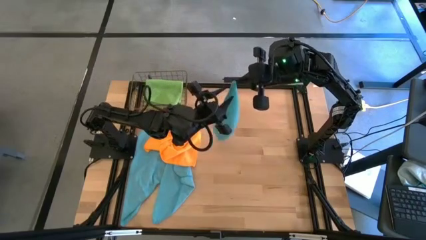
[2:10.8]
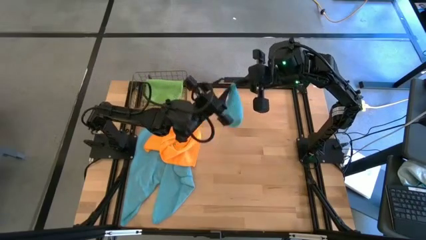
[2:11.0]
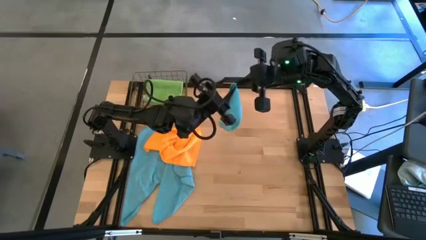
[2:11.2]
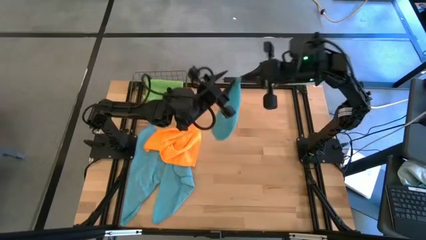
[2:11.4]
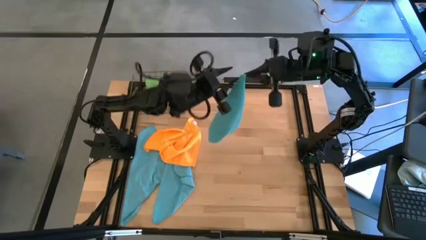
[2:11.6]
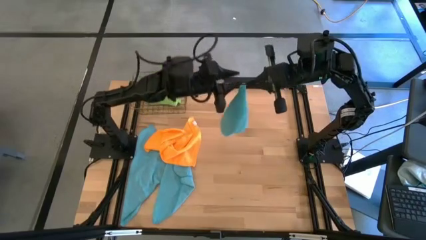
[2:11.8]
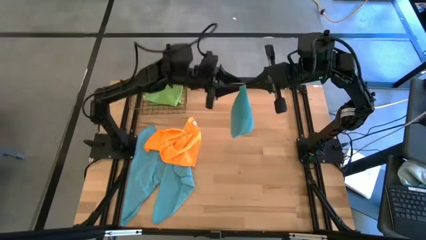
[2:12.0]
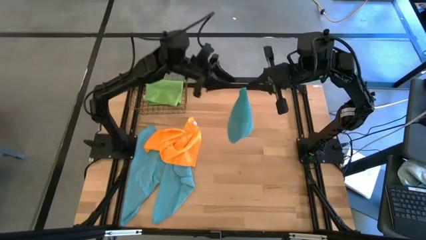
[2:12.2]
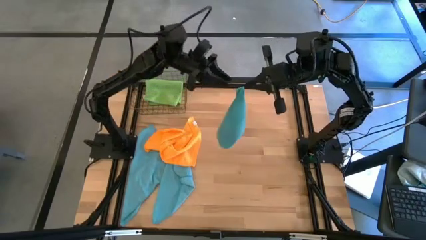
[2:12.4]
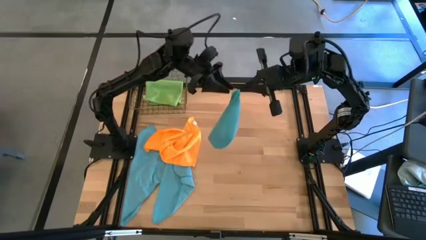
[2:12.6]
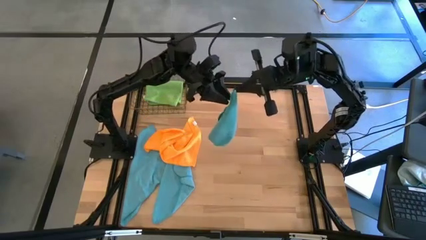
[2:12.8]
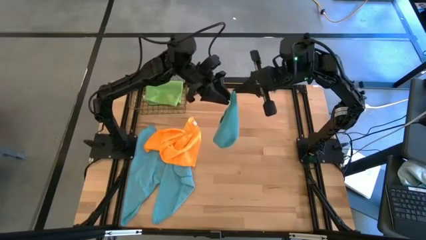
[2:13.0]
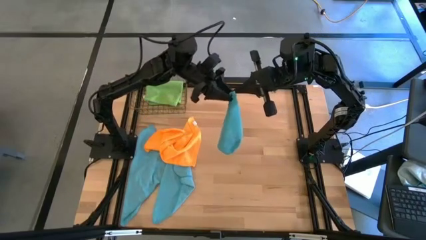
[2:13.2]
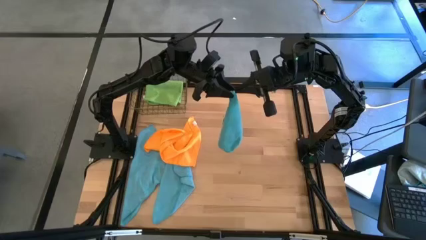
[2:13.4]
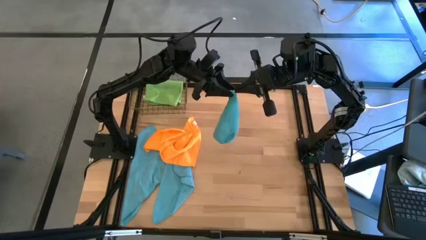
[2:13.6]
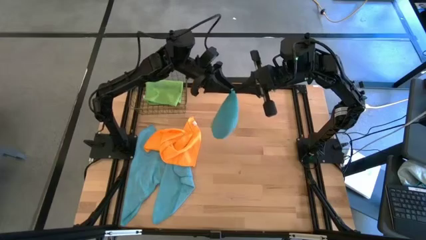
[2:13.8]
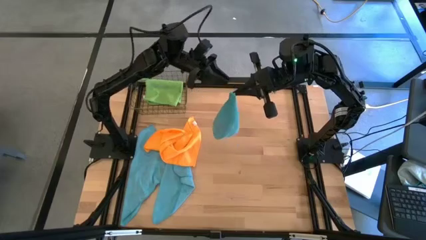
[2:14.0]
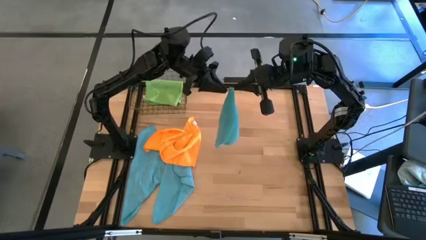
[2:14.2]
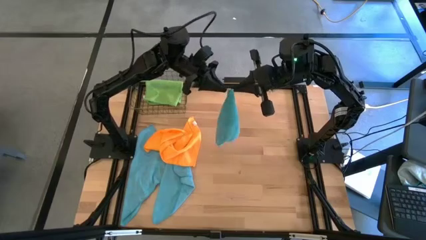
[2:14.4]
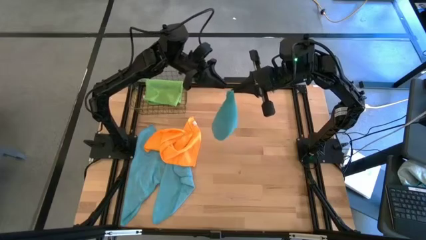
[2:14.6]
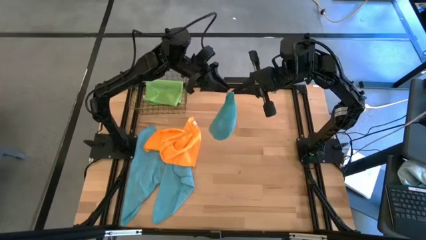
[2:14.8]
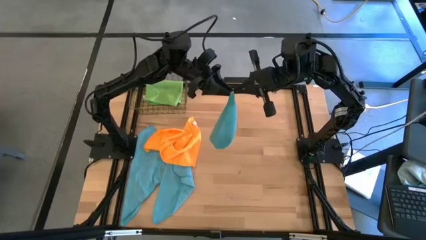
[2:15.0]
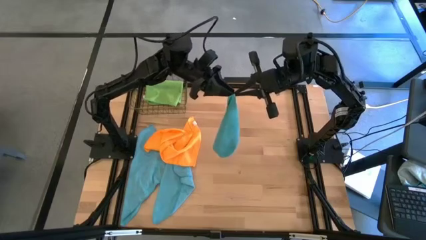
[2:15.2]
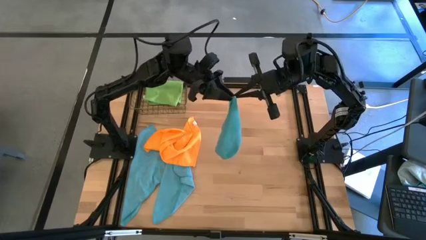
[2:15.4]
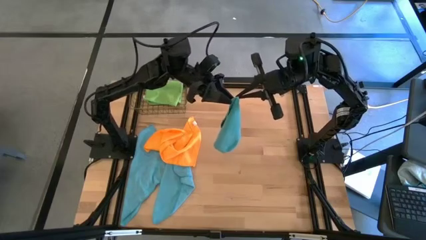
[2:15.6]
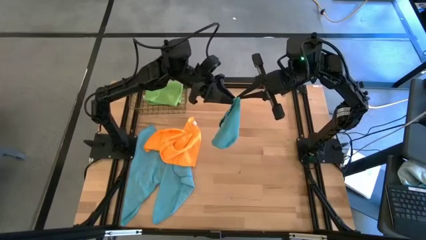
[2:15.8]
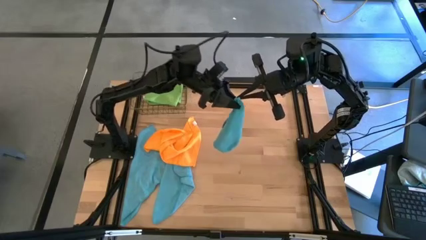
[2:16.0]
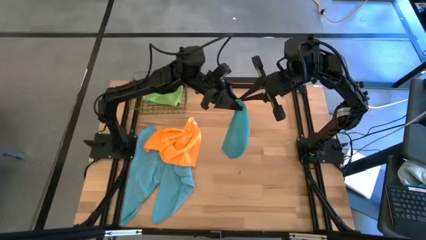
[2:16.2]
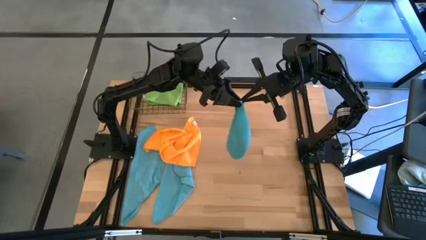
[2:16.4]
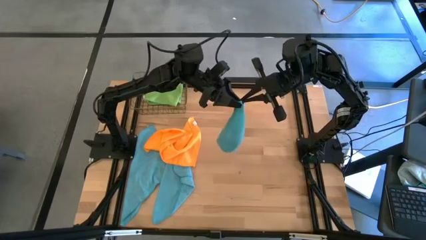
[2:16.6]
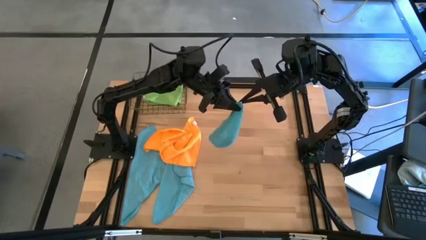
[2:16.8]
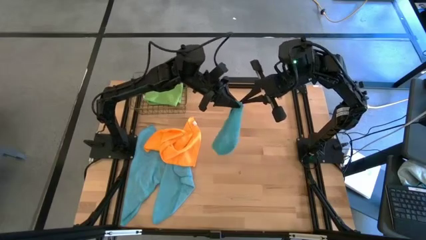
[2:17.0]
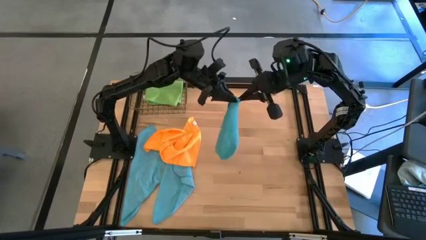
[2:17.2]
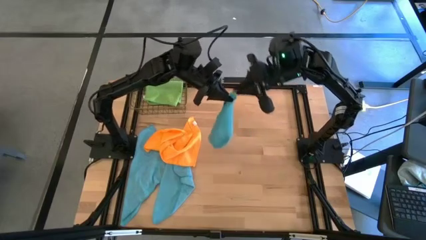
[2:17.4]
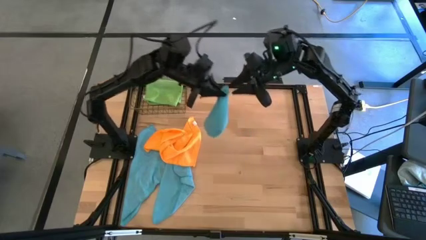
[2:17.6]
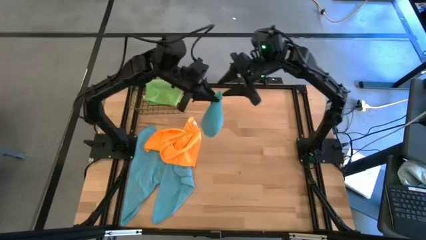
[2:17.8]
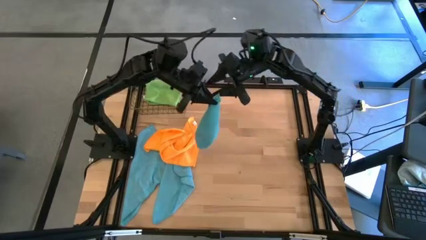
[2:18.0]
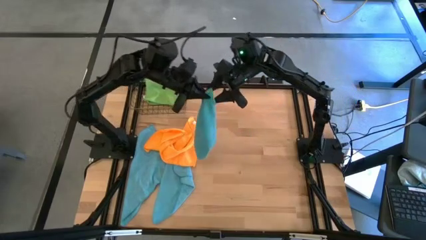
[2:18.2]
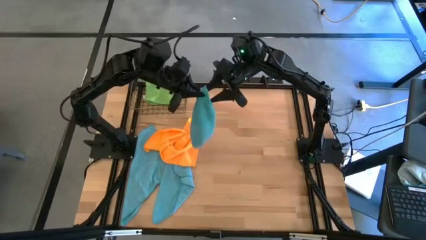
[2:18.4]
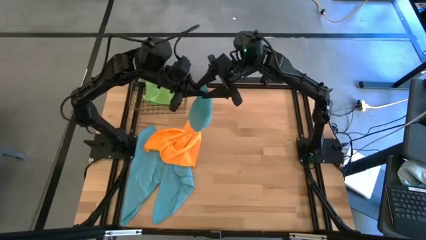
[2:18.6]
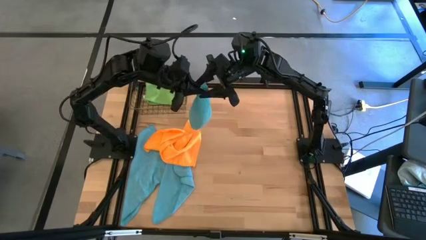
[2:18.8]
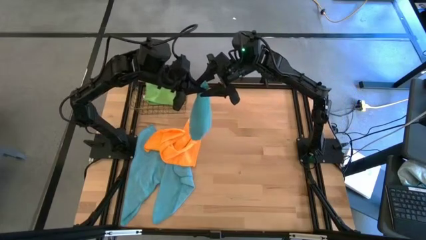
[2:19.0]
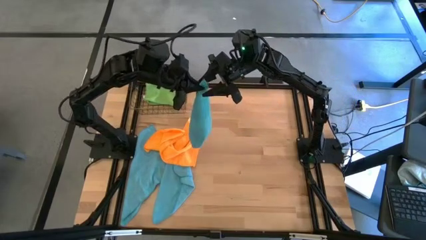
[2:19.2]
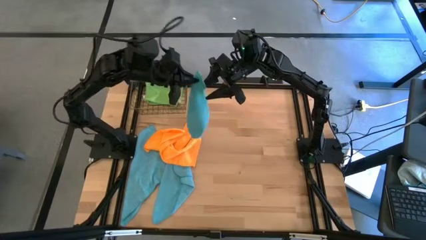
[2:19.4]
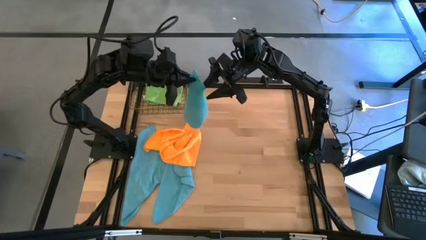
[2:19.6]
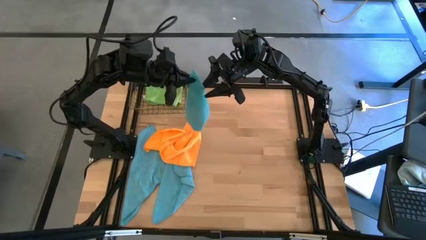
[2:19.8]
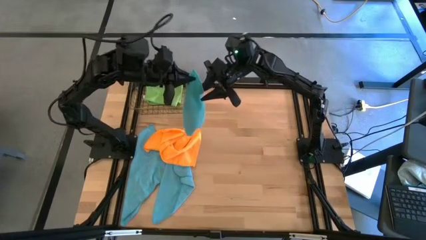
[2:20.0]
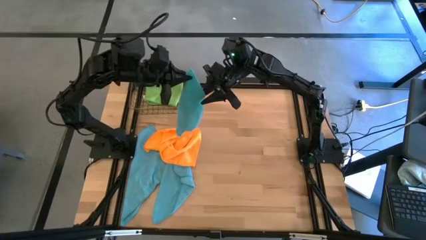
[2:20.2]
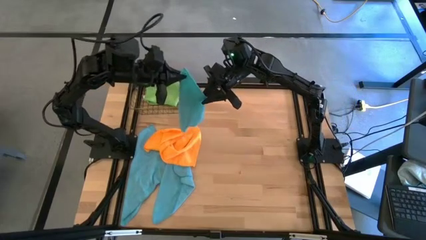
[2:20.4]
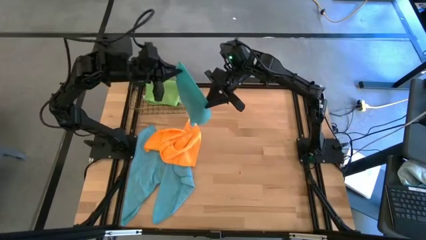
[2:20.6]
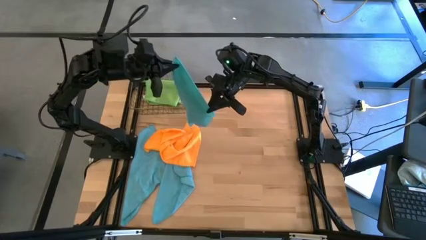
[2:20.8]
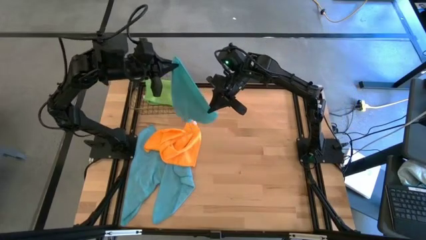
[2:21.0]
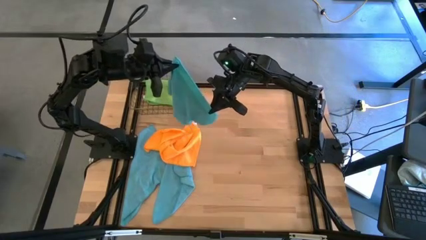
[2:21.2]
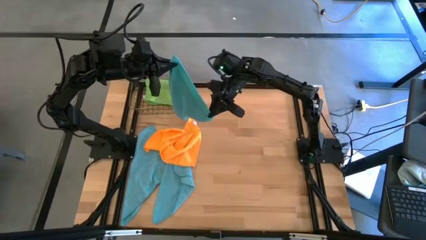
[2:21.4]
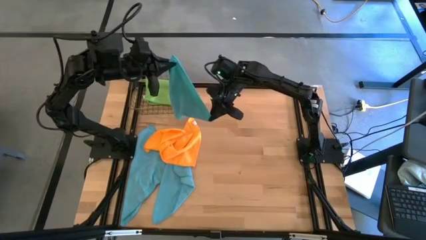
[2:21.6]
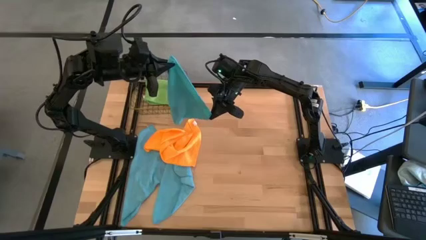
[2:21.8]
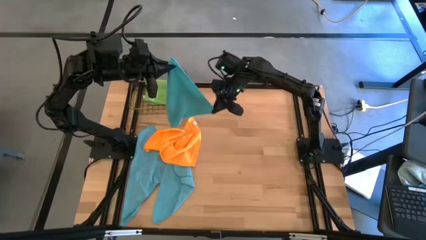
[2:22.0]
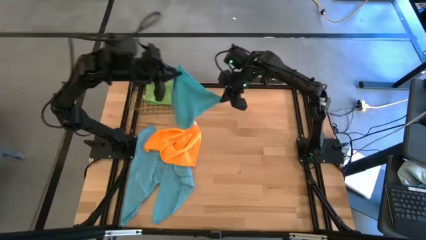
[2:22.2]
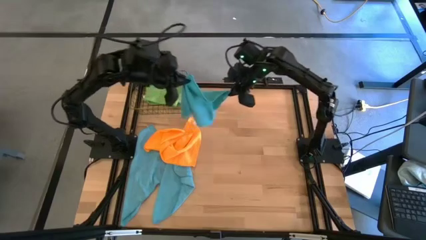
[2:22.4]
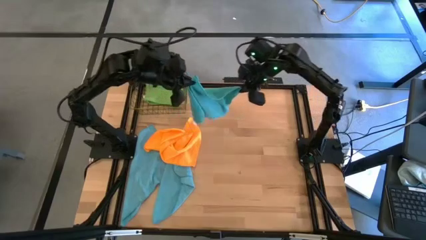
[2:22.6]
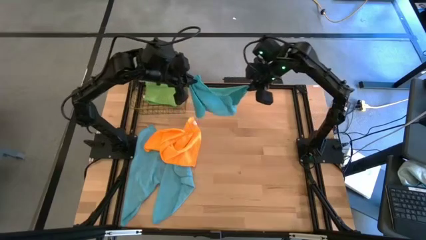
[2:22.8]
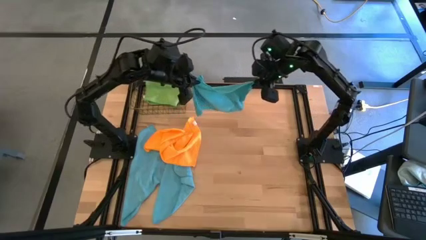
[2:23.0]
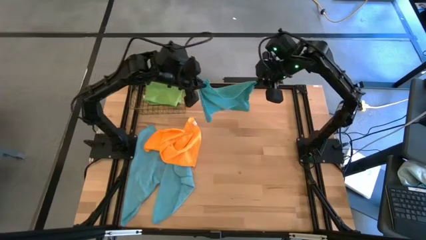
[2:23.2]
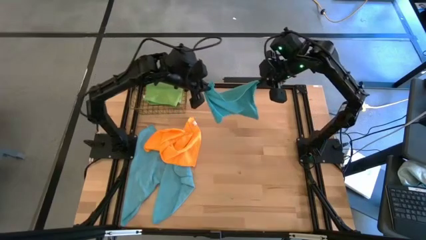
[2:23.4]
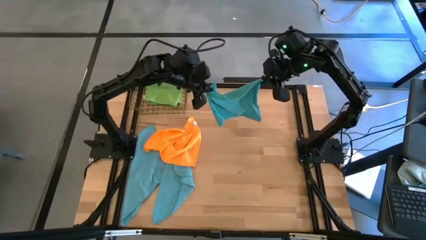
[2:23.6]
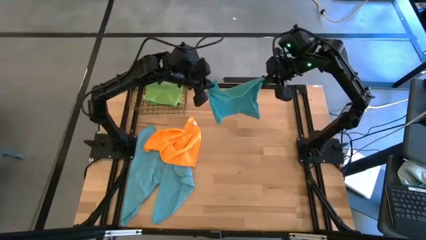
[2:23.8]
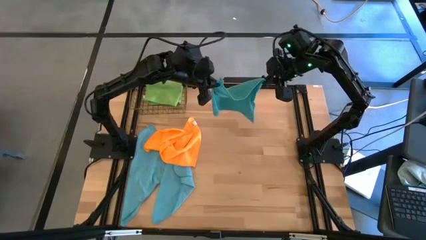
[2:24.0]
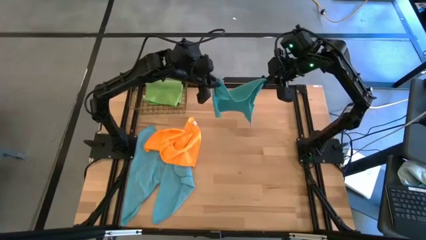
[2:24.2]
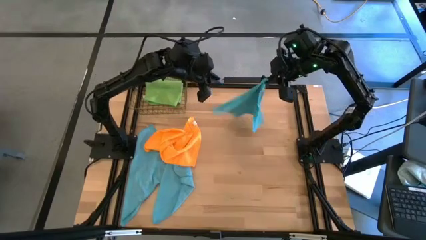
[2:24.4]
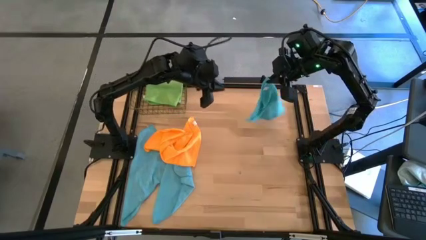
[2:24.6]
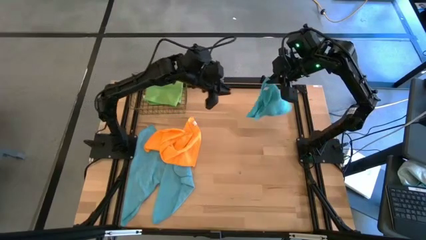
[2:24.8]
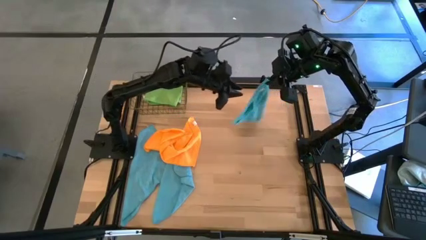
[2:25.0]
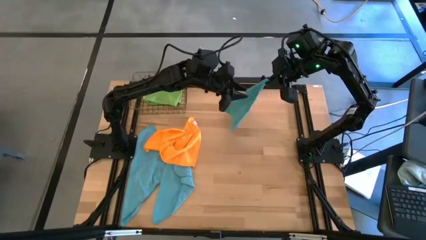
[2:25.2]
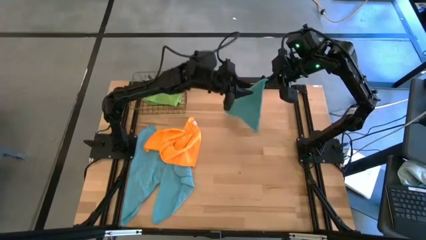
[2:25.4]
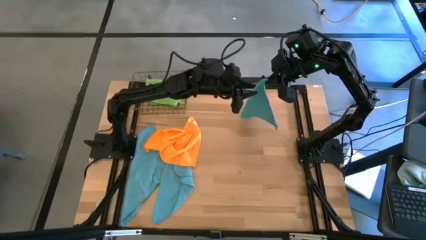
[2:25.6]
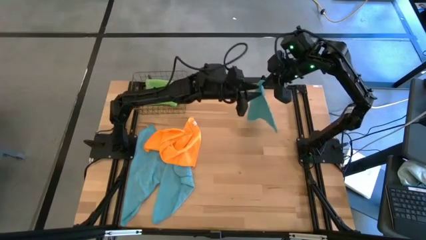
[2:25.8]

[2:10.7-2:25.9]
Task: Fold microfiber towels
Fold the blue microfiber cloth

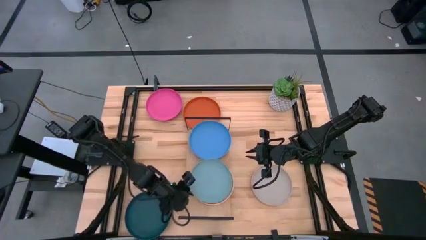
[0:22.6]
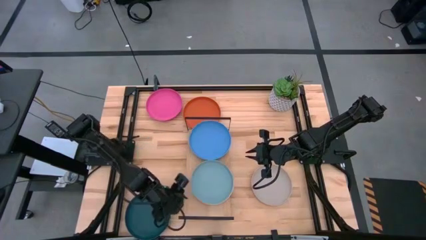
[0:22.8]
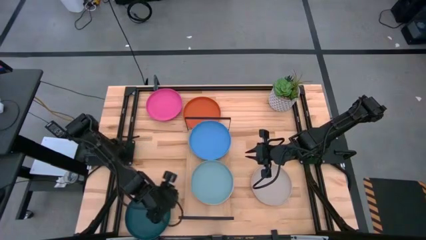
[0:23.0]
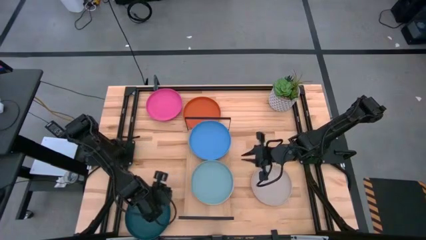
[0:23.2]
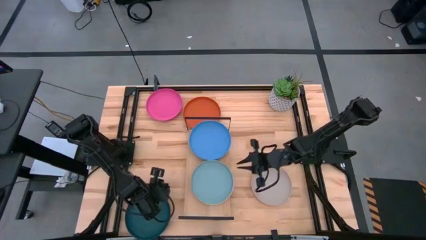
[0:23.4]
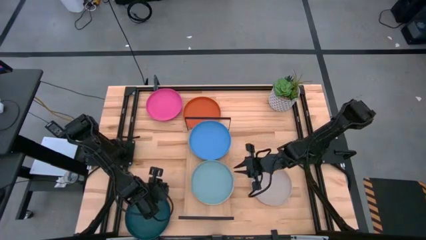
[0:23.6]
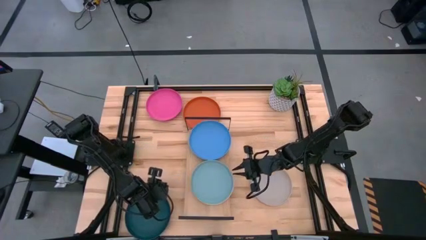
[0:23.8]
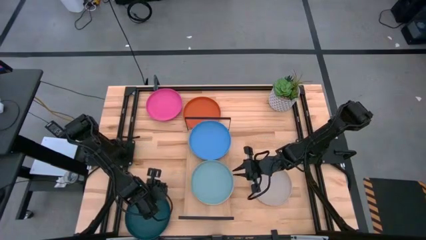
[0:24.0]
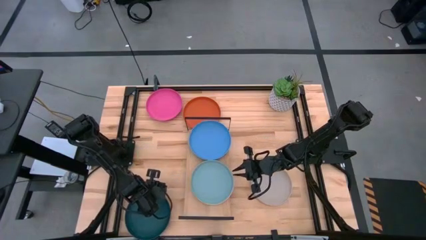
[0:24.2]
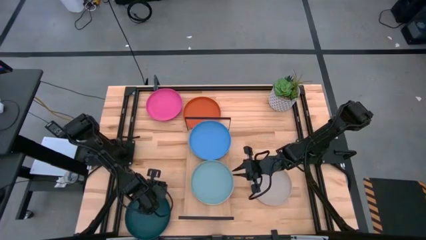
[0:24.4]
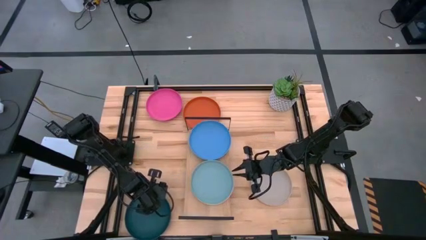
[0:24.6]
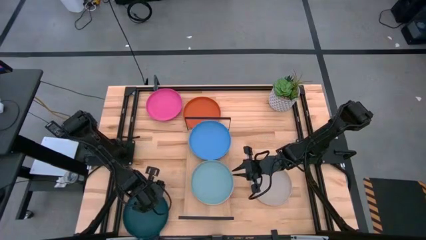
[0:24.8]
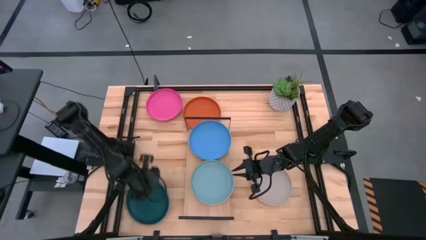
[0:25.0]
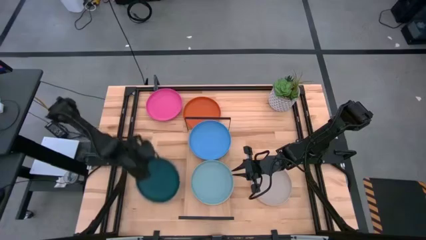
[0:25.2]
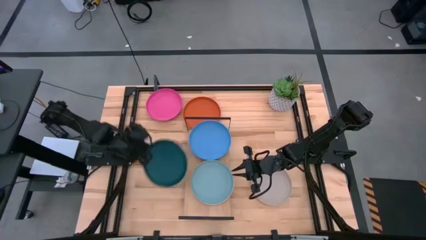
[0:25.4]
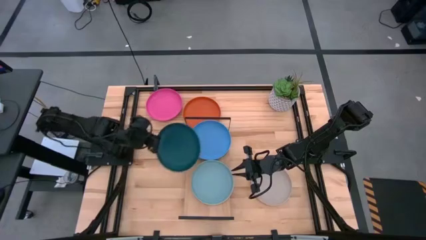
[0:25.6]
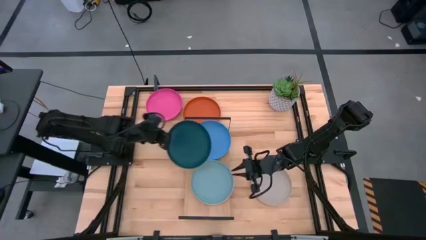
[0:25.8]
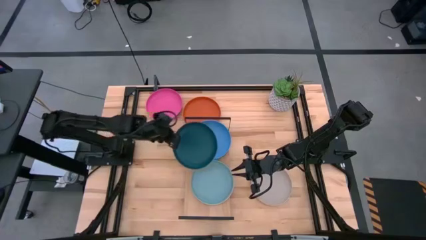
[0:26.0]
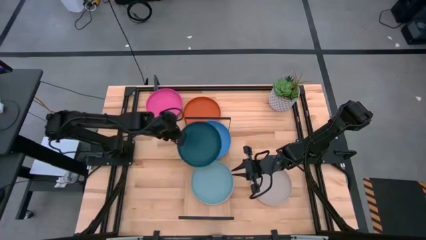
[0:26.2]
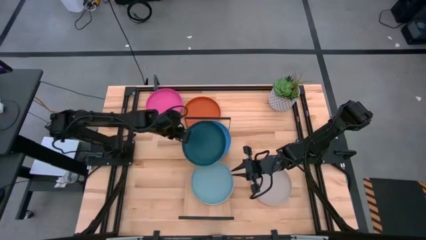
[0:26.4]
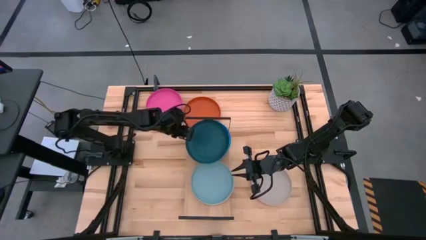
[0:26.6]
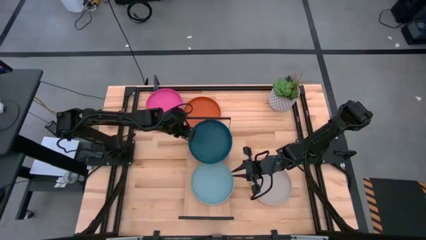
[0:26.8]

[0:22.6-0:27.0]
Task: Place and stack plates onto a shelf
Stack the dark blue plate on top of the light blue plate
